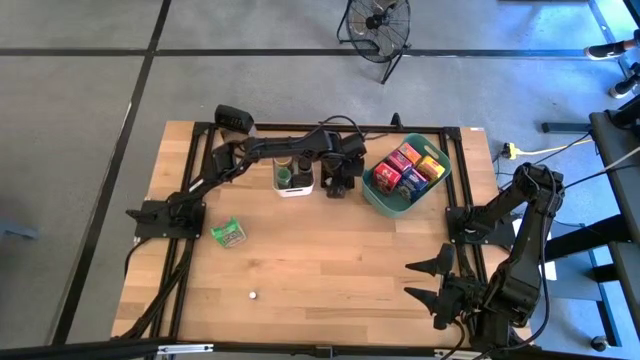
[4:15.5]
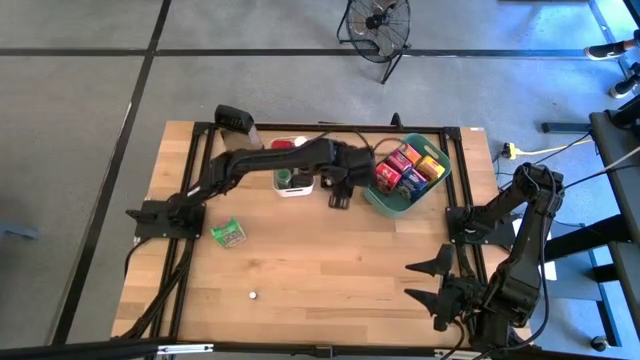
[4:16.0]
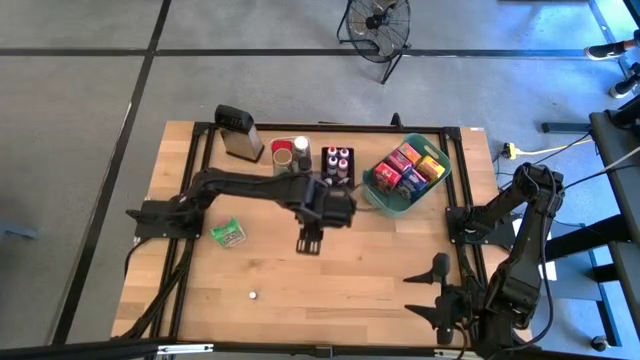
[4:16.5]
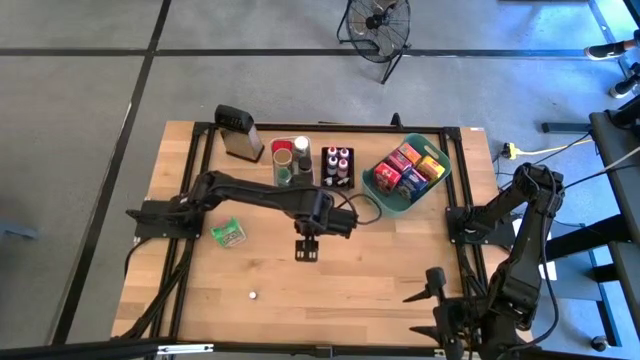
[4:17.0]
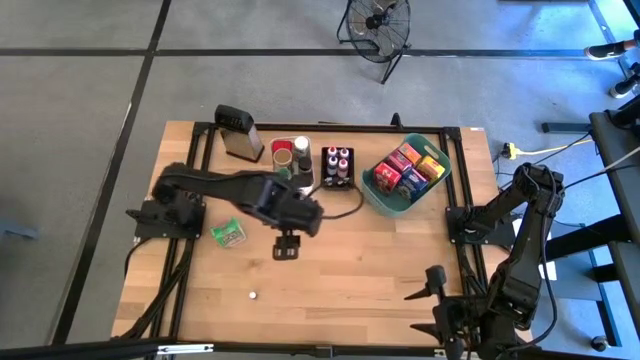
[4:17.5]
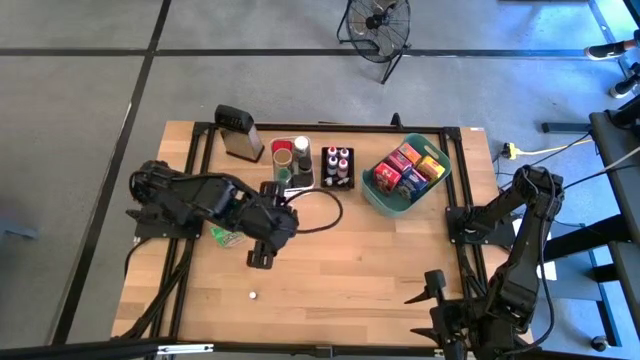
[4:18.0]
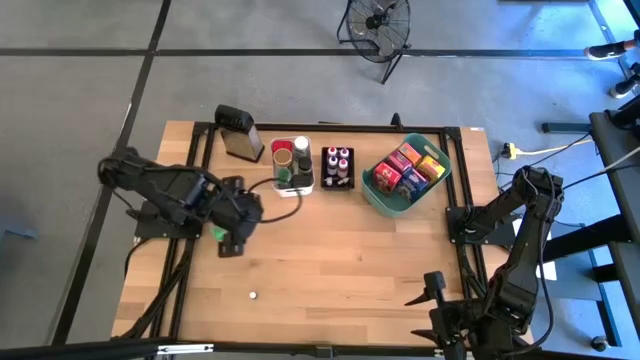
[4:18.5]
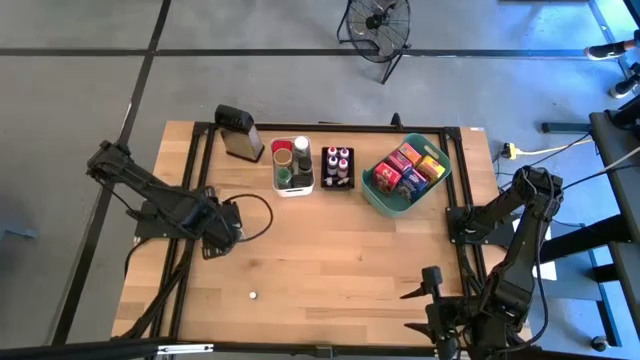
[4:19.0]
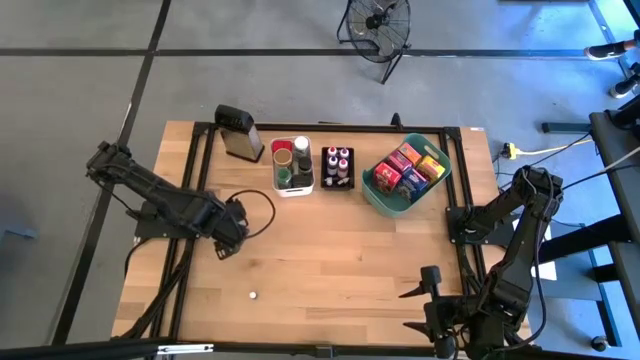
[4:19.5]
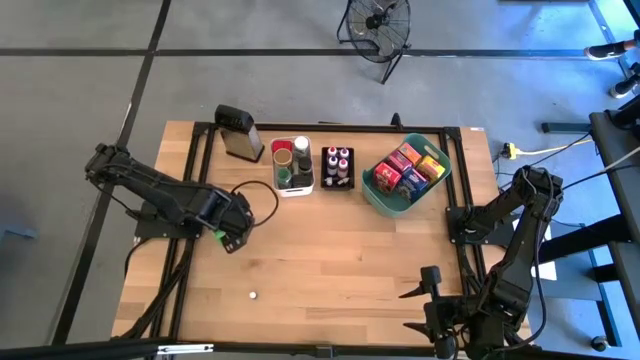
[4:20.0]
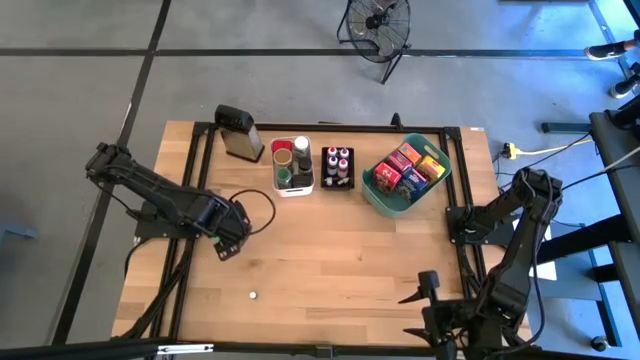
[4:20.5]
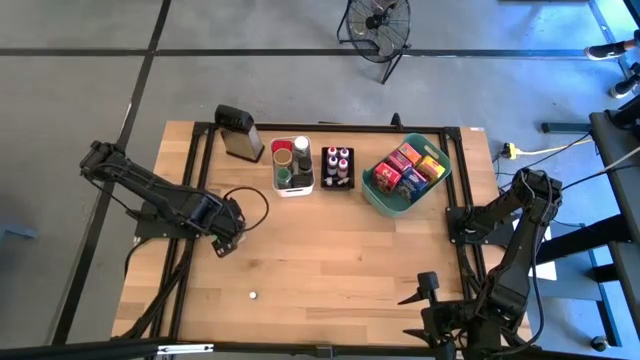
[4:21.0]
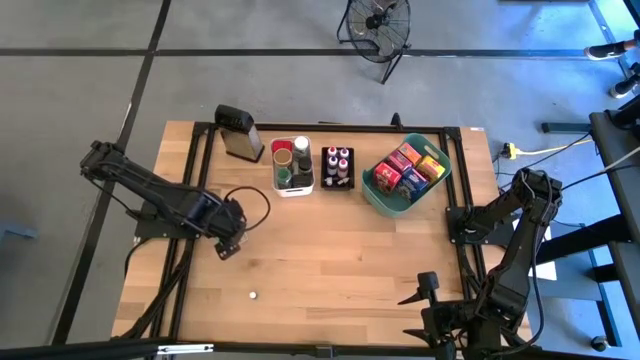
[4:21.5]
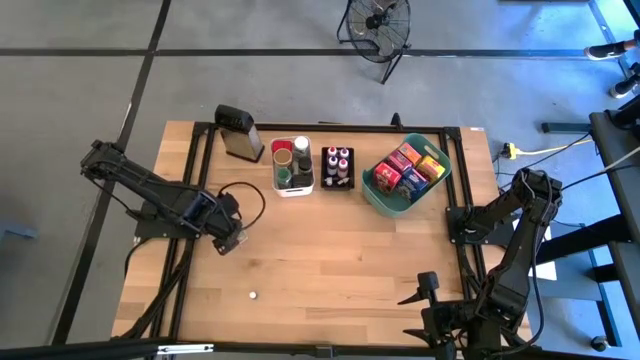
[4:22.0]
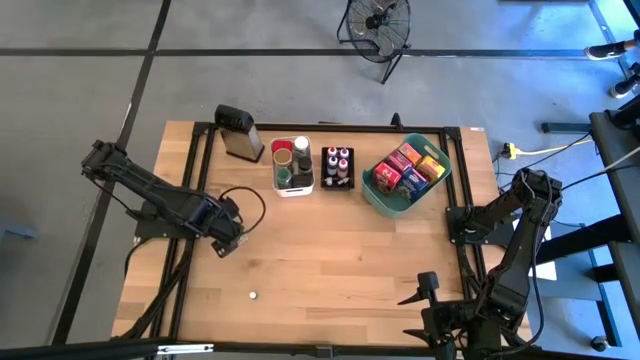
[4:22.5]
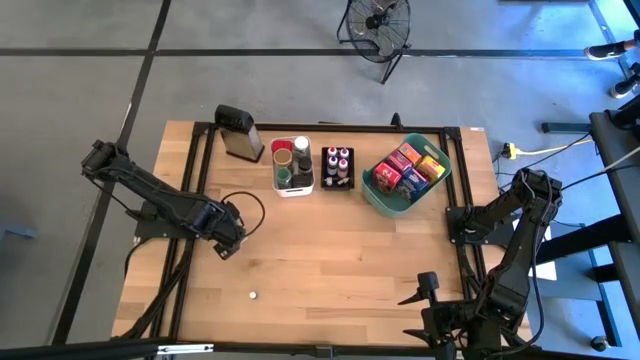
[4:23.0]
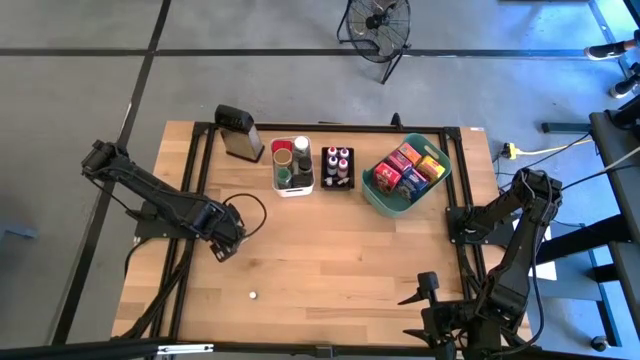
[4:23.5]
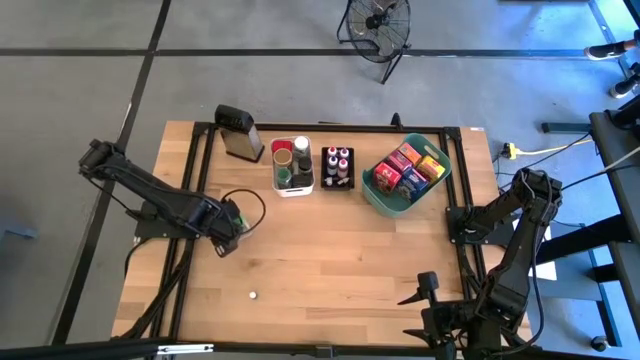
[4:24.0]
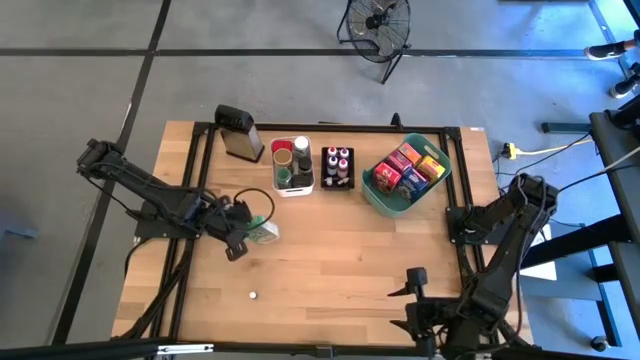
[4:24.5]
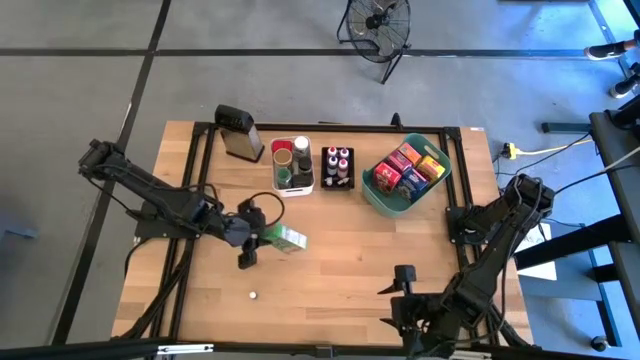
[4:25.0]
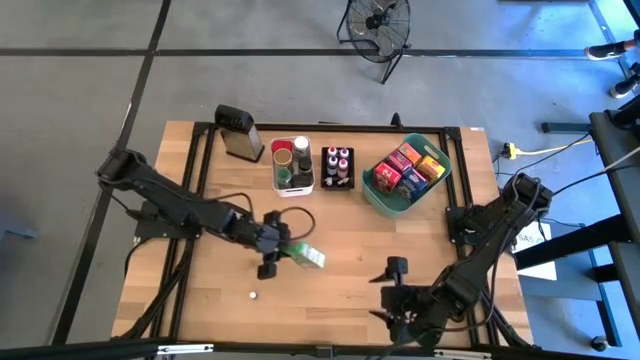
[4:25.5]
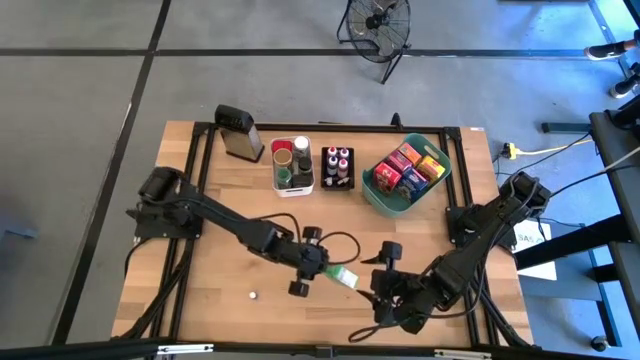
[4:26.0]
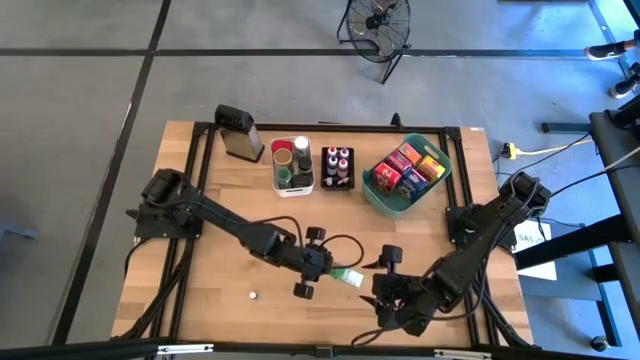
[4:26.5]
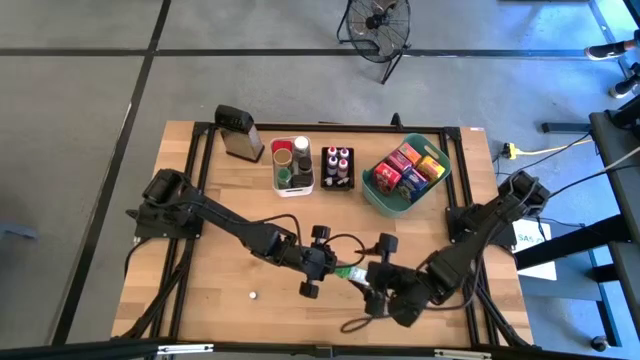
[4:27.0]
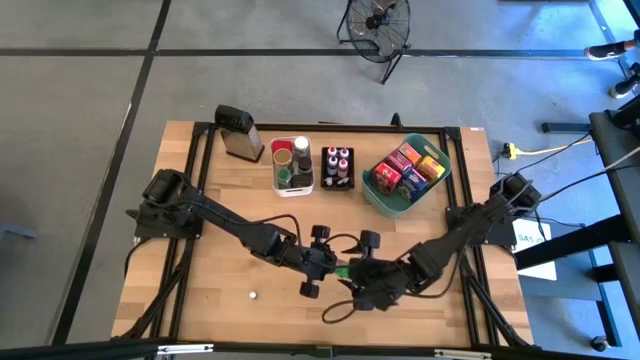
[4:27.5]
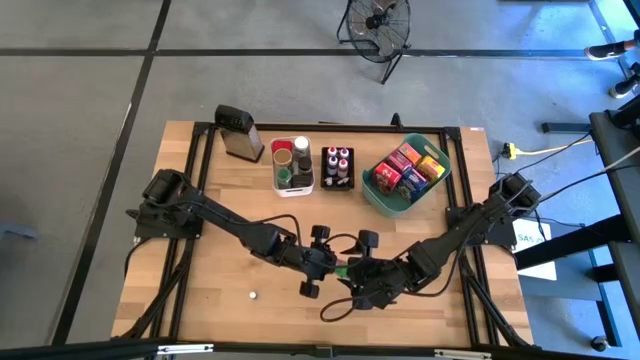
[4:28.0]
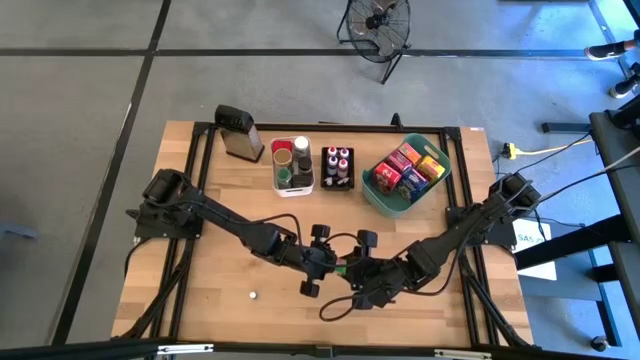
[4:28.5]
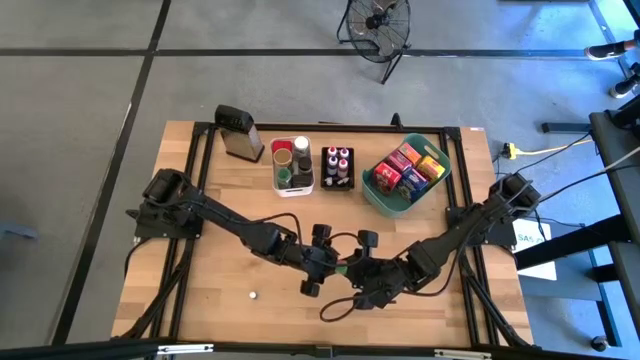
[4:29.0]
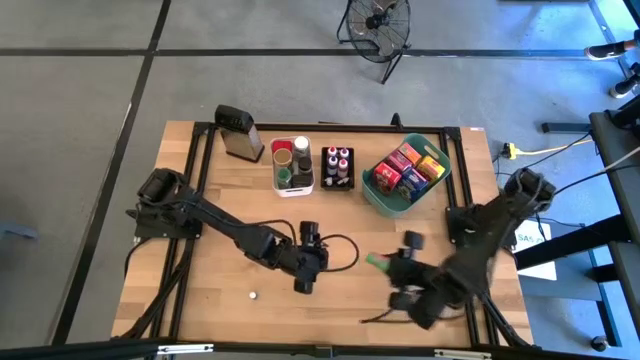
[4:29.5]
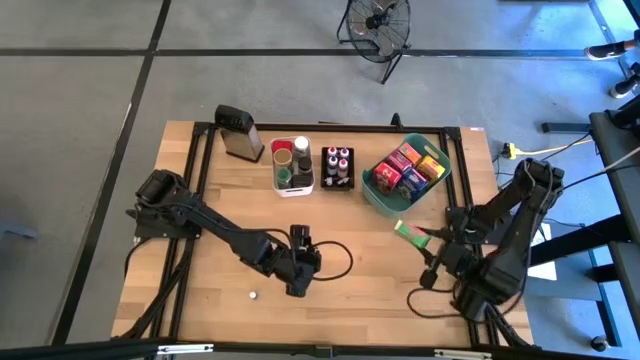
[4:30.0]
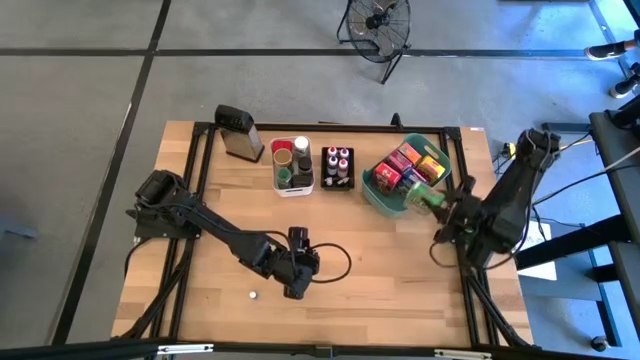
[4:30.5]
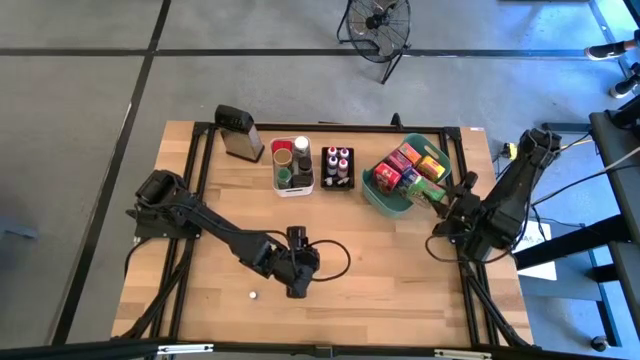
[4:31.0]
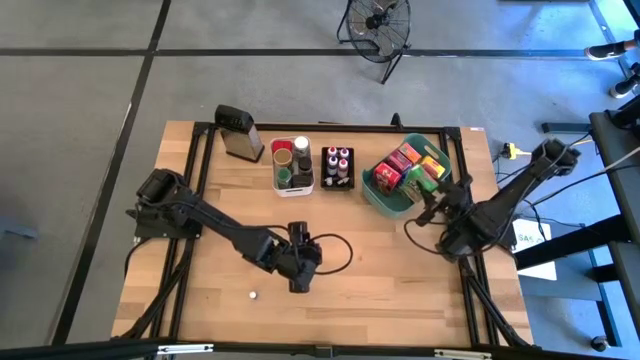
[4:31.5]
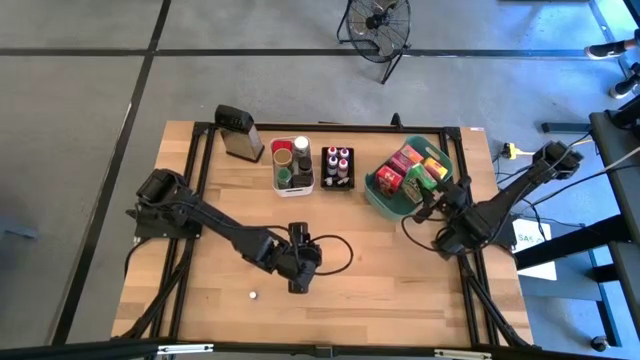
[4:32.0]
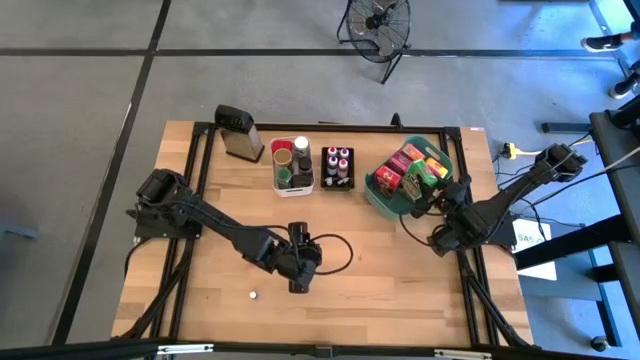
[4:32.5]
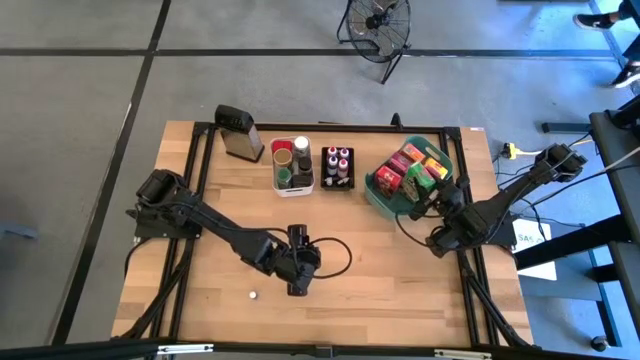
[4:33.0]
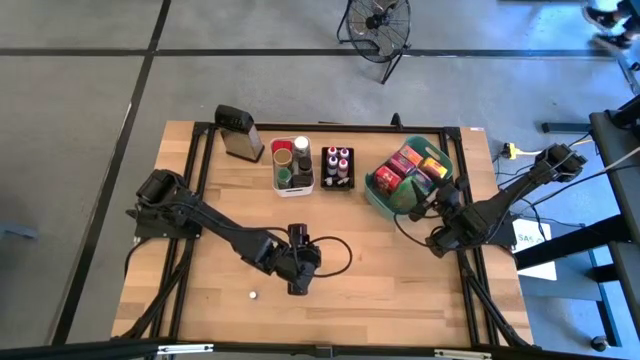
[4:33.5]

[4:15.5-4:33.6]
Task: Pick & Place Kitchen Items
Put the green cereal box into the green bin

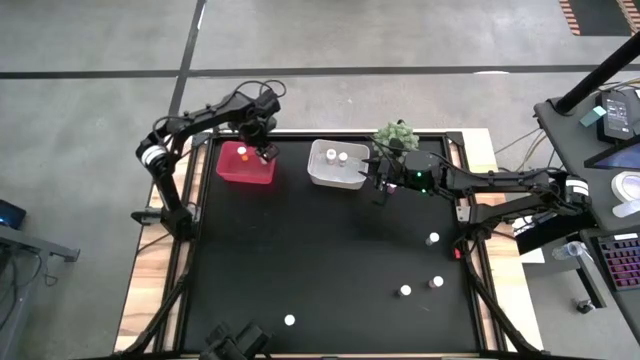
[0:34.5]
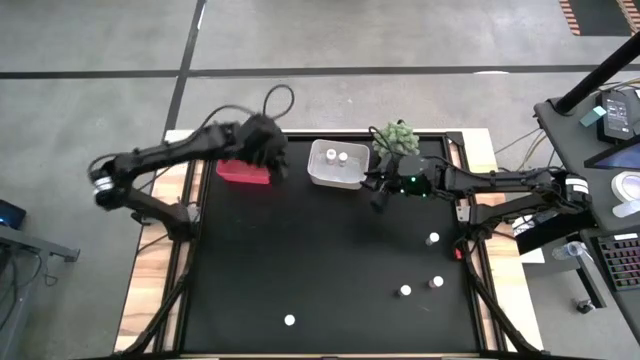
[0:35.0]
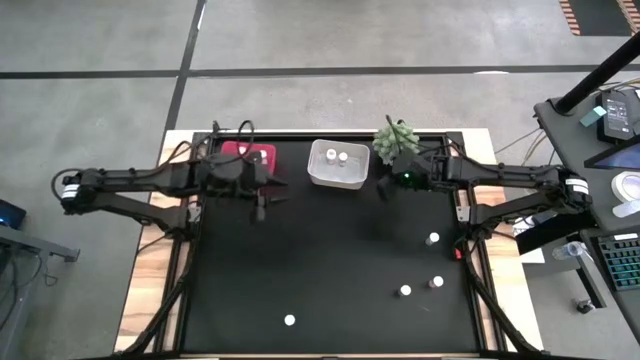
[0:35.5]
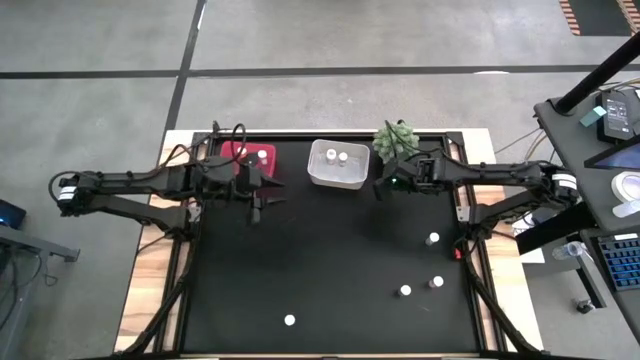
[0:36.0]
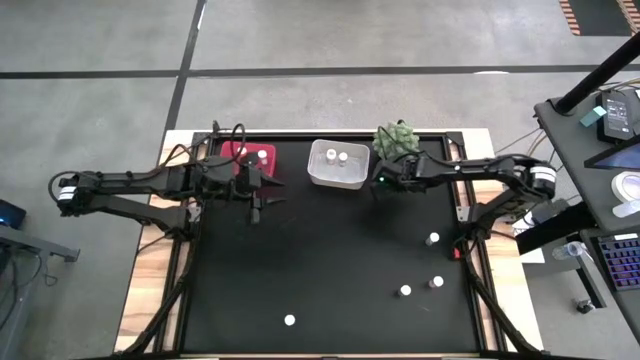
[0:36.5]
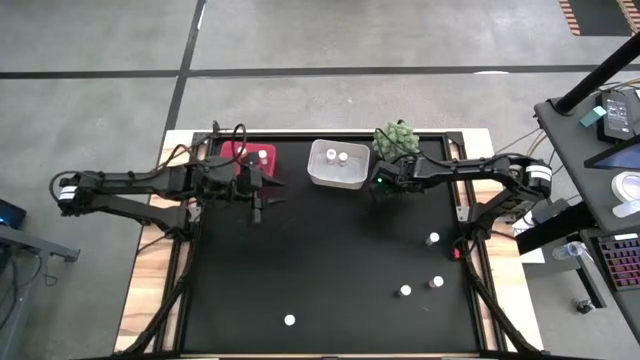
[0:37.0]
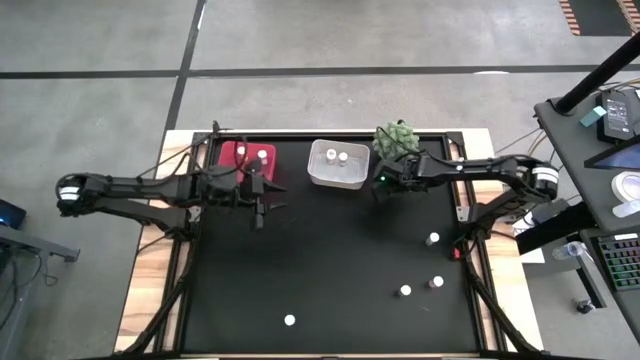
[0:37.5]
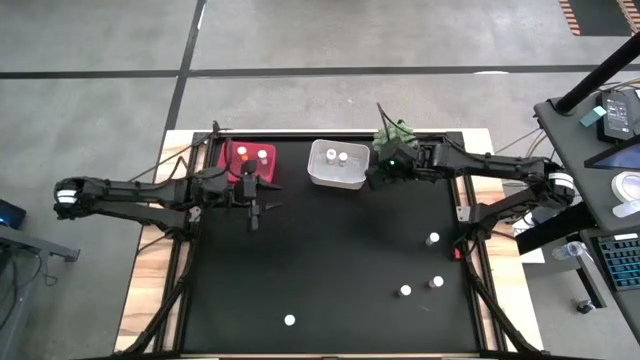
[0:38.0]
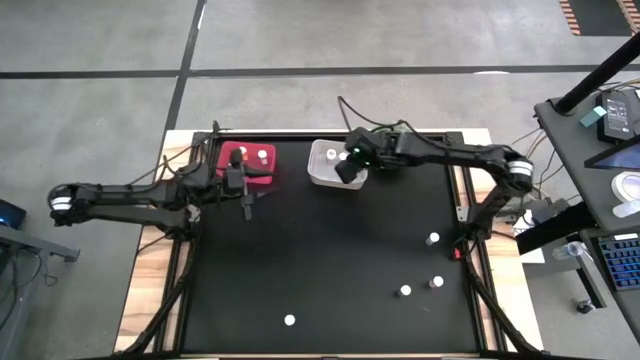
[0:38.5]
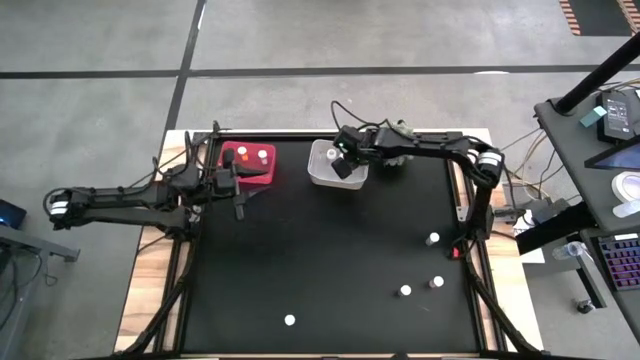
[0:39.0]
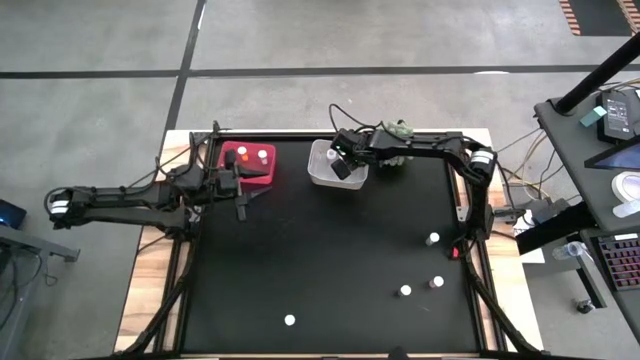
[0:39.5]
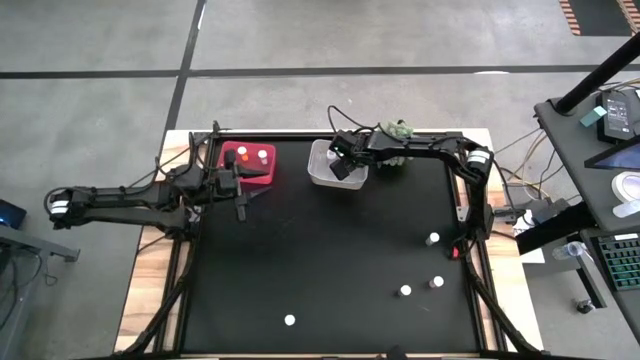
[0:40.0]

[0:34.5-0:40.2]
Task: Pick and place medicine bottles into bin by pill shape (circle, oval)
Put the blue capsule bottle into the white bin
